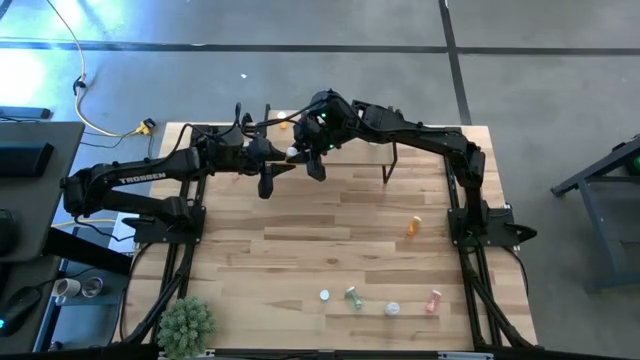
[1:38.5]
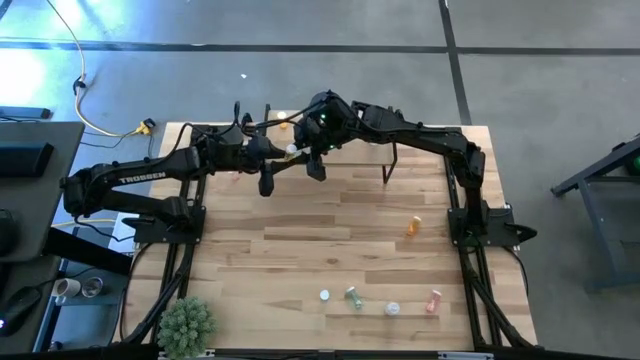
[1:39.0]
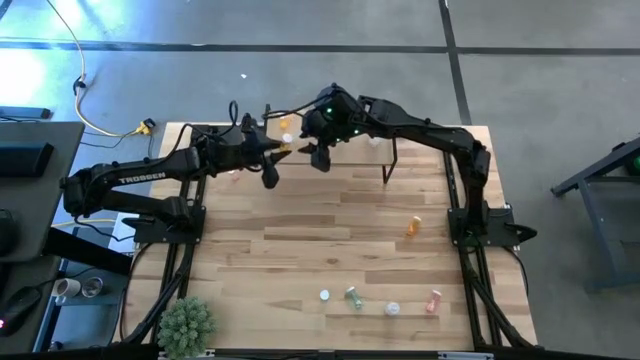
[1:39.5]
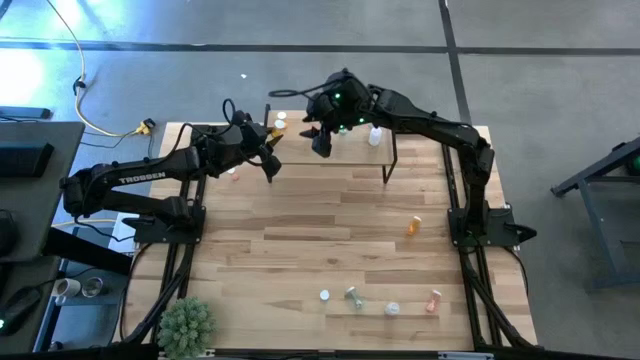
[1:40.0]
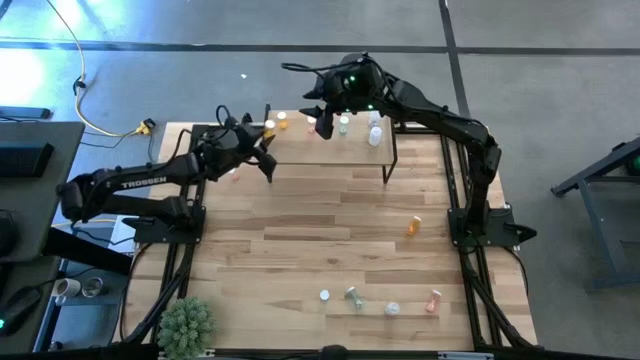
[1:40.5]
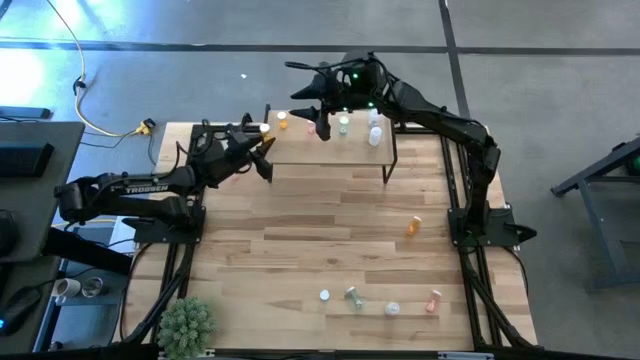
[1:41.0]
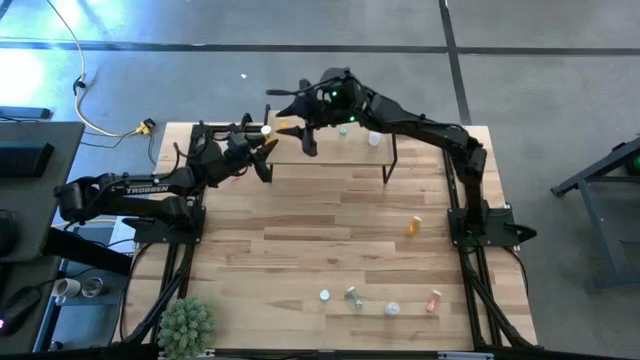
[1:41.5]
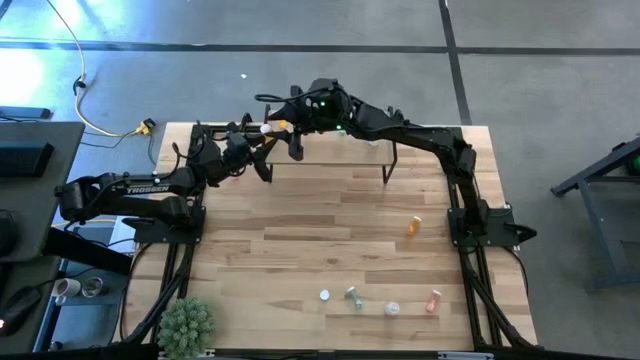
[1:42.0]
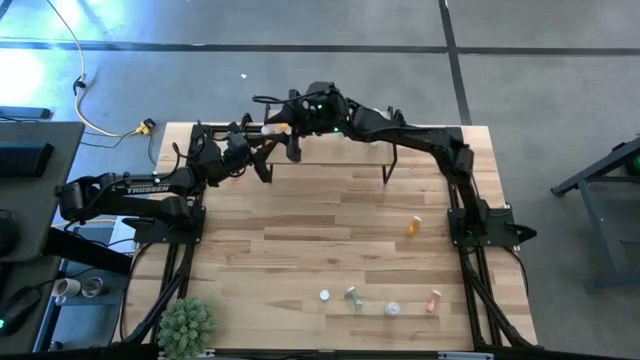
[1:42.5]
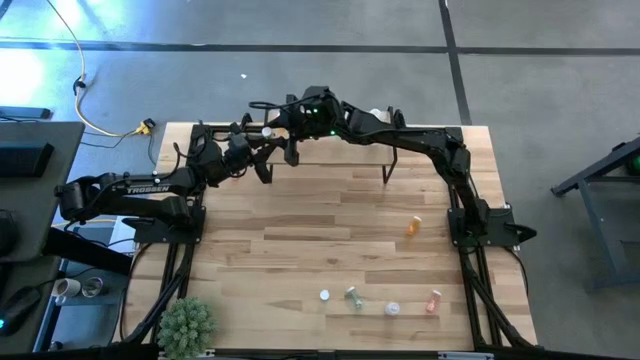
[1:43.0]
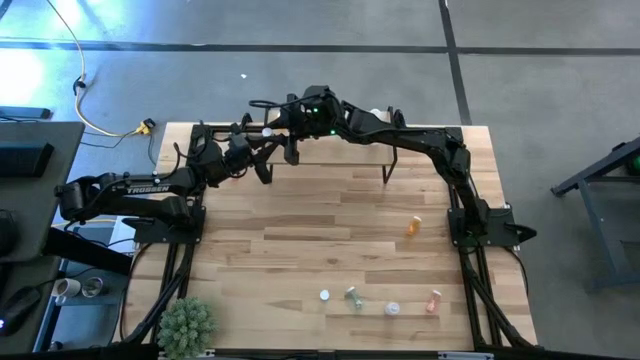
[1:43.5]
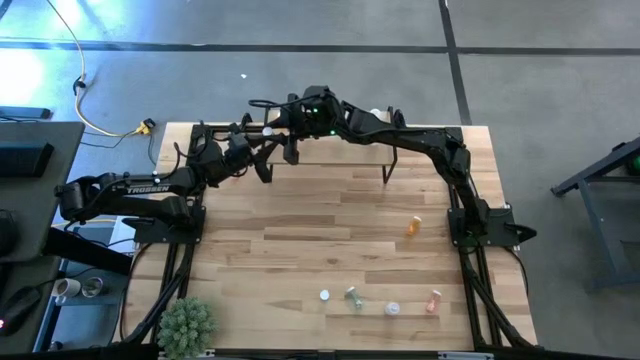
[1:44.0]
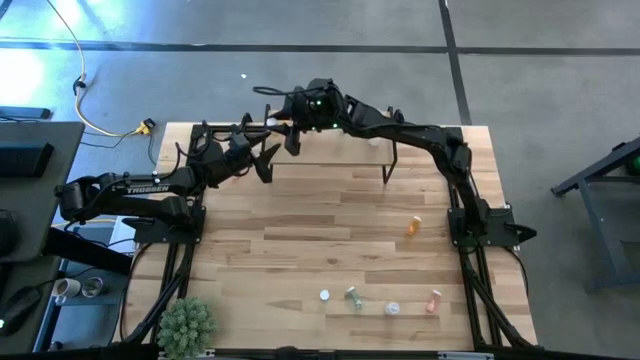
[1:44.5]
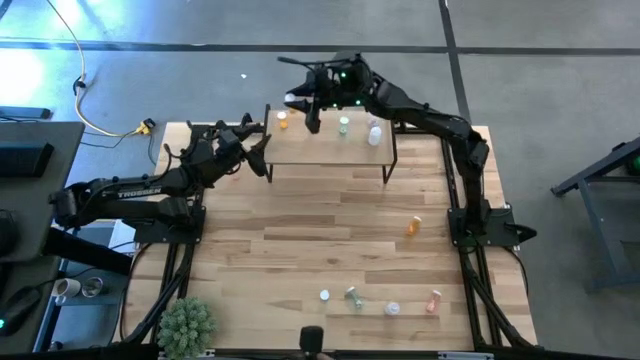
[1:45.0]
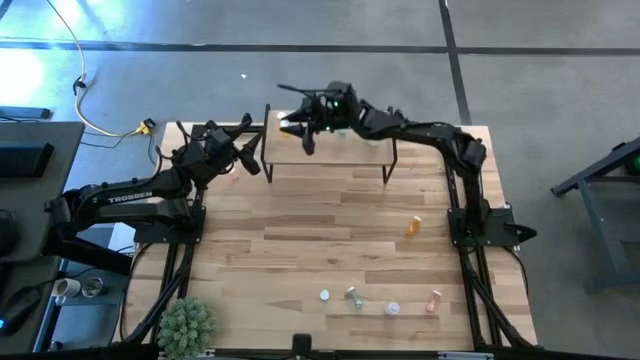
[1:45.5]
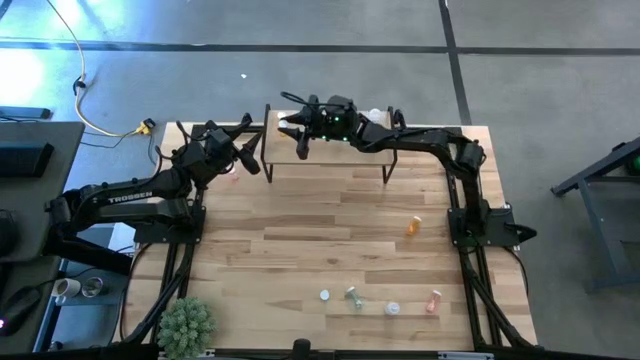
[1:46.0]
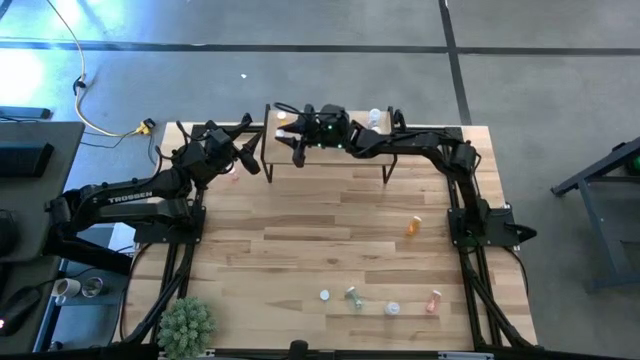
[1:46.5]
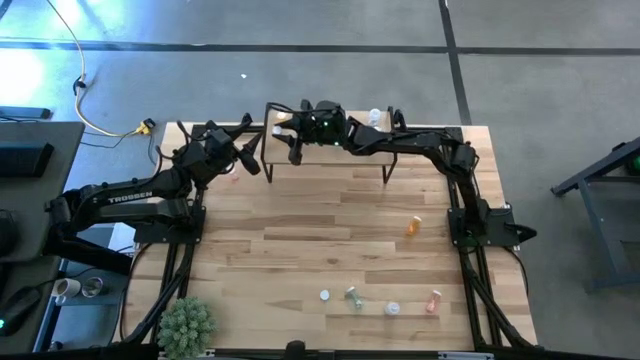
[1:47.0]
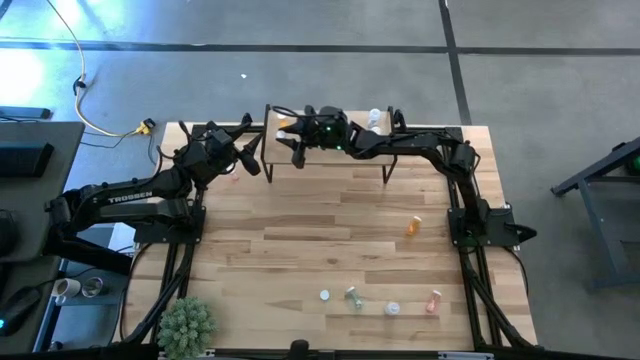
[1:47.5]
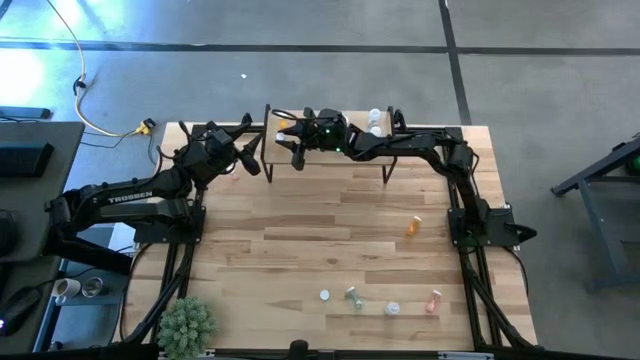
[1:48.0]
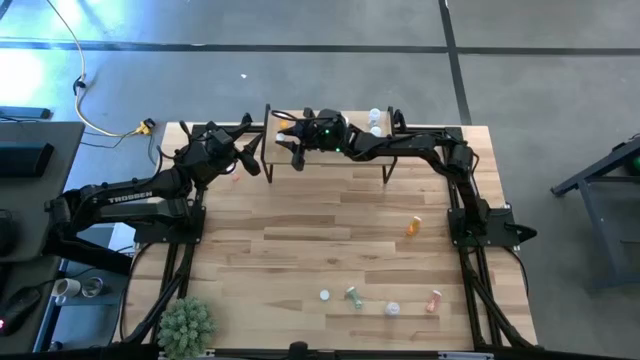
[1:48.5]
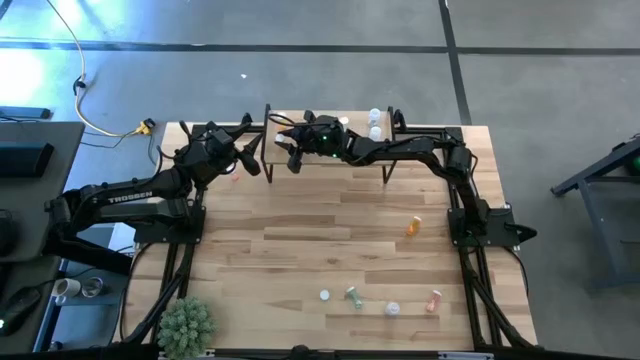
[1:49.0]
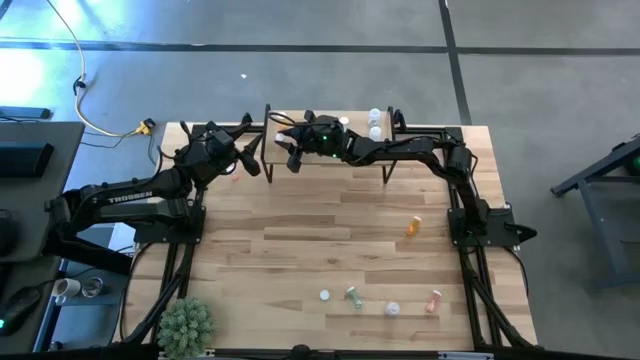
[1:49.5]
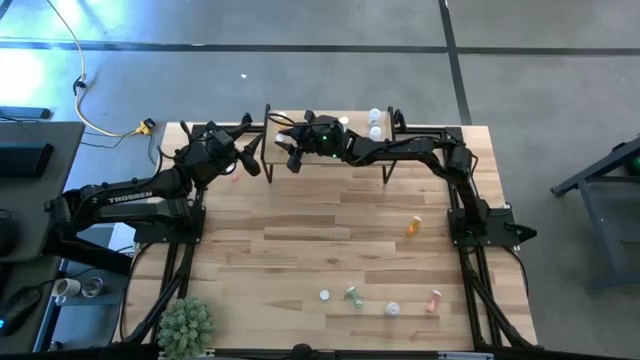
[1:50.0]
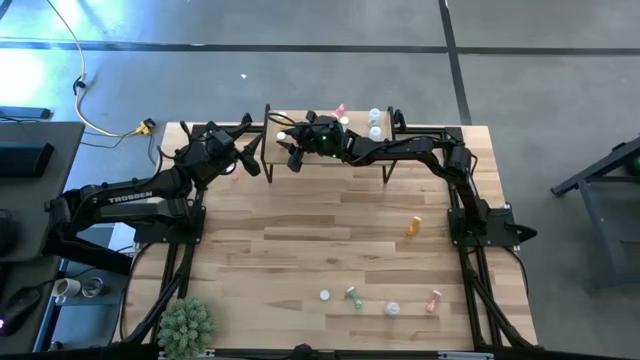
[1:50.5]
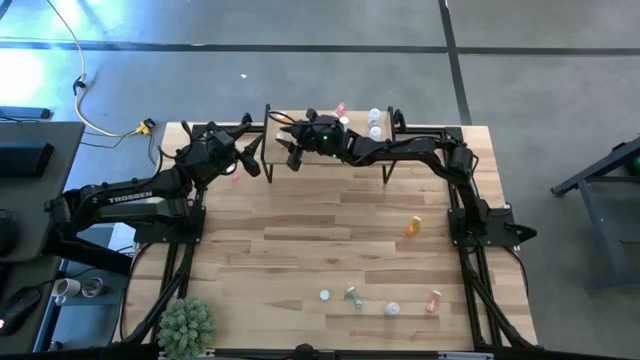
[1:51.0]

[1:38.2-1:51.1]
Task: Pick and place medicine bottles onto shelf by color
Put the bottom orange pill bottle on the shelf aligned with the orange pill bottle

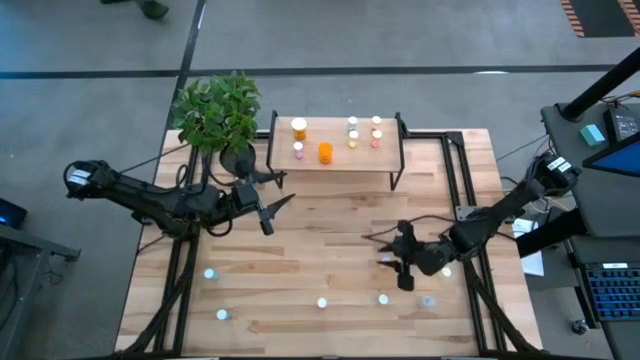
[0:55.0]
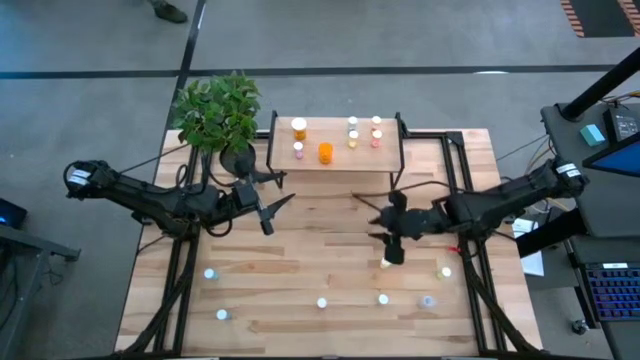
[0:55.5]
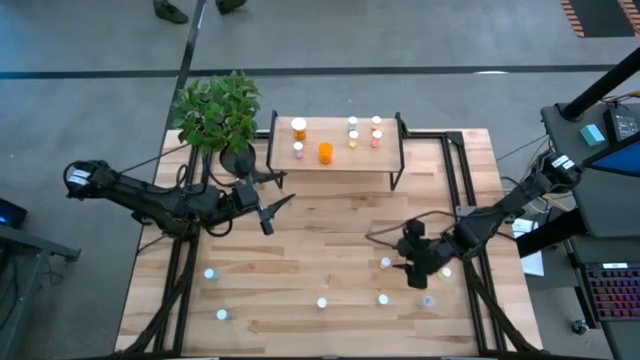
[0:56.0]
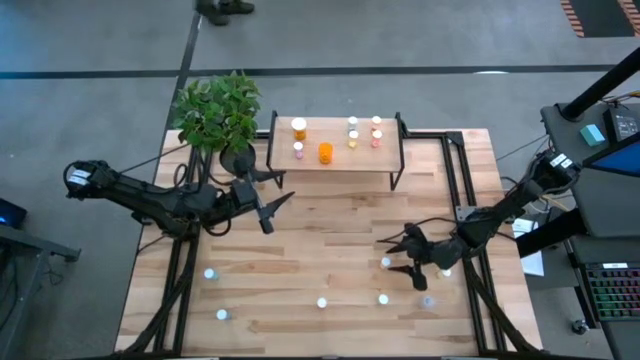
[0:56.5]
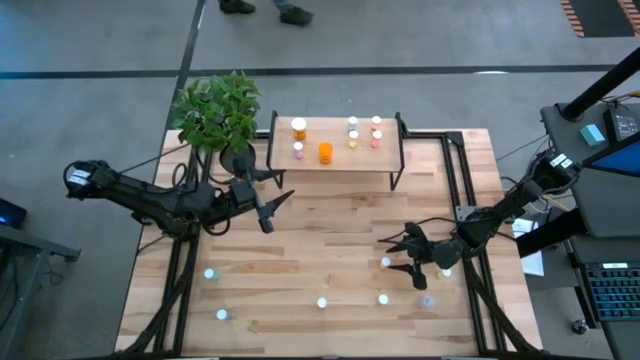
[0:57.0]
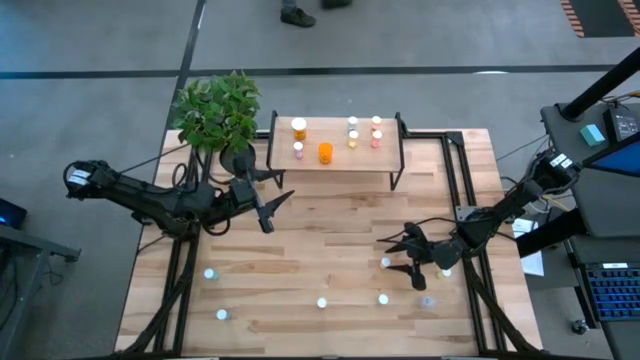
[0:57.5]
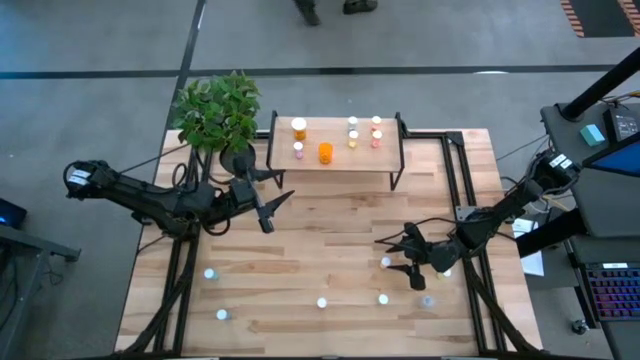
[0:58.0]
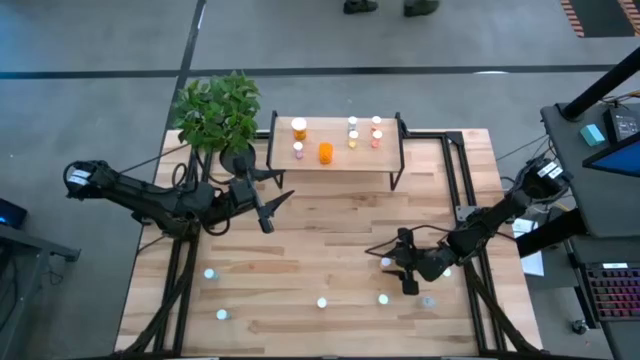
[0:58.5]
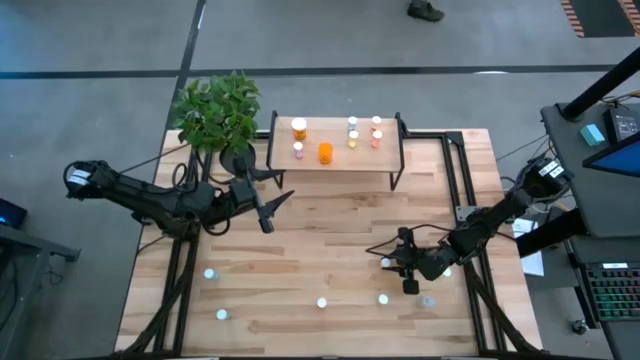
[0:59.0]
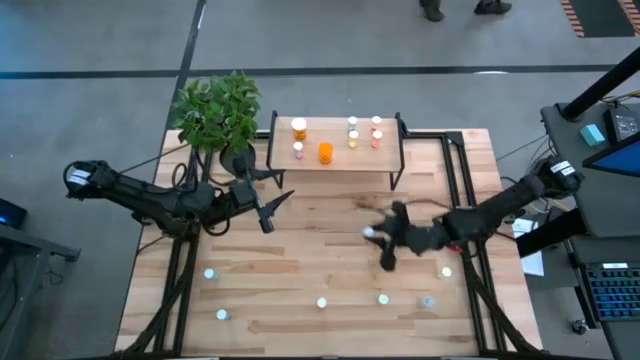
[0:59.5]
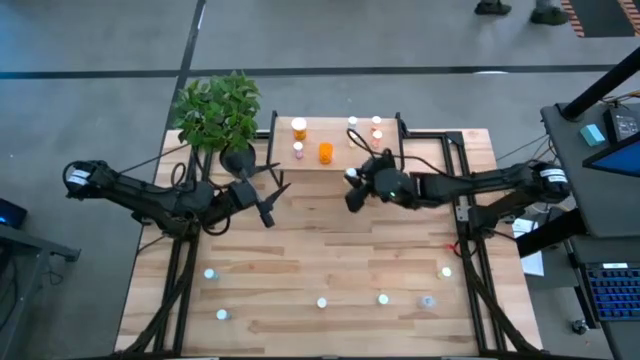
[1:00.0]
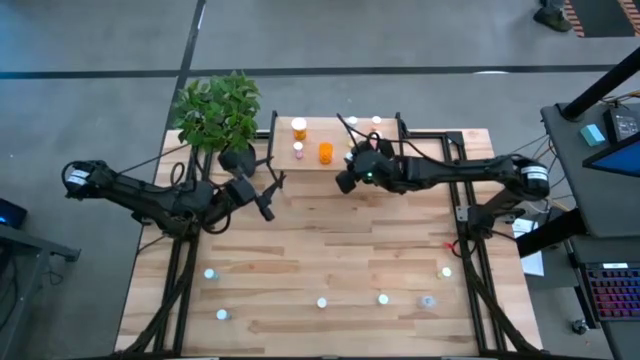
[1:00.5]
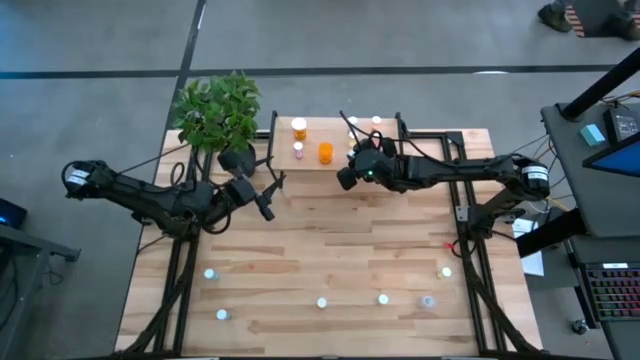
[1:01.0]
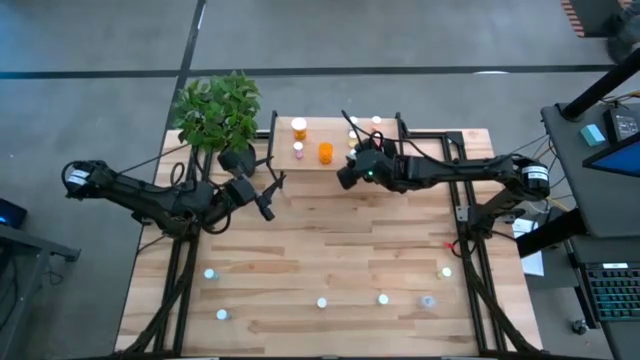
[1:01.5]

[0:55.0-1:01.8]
Task: Pick and place medicine bottles onto shelf by color
Put the yellow pill bottle on the shelf

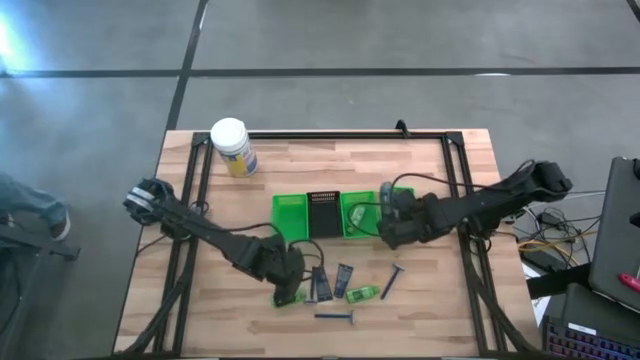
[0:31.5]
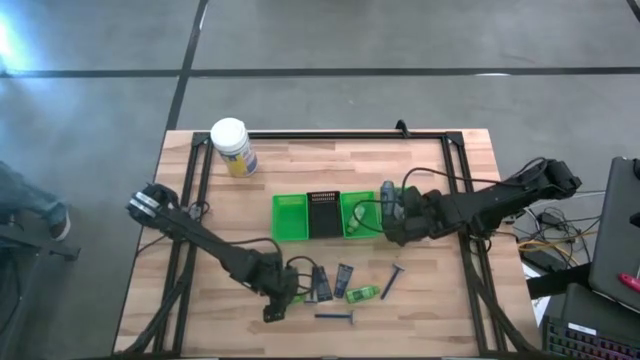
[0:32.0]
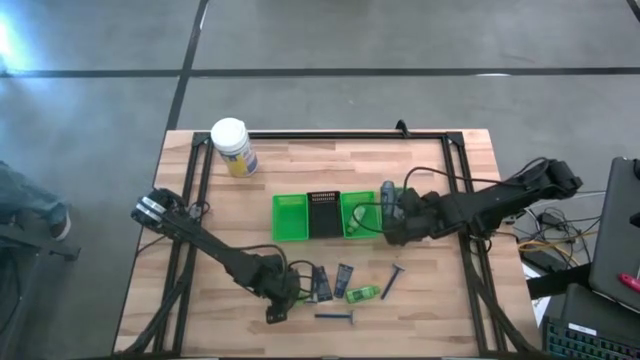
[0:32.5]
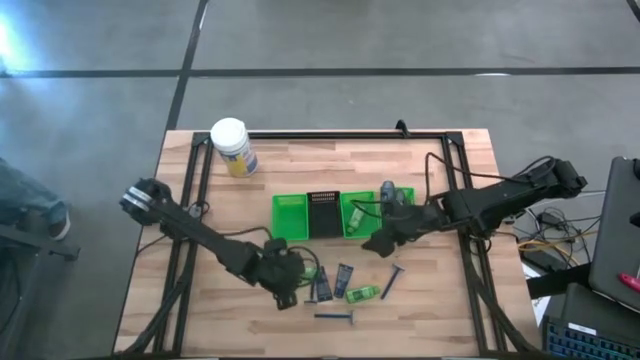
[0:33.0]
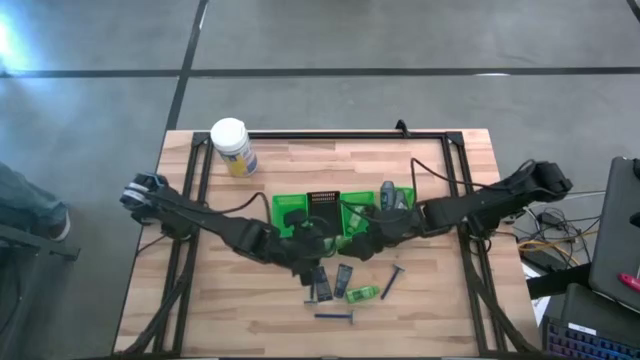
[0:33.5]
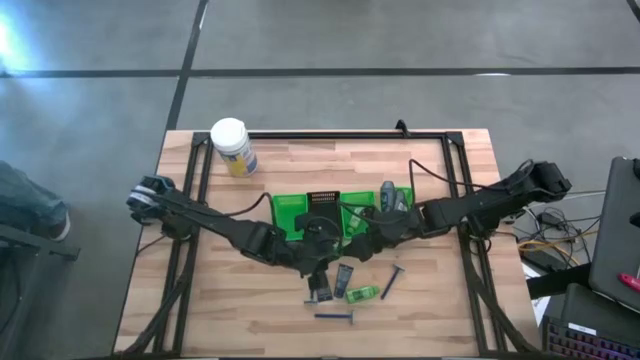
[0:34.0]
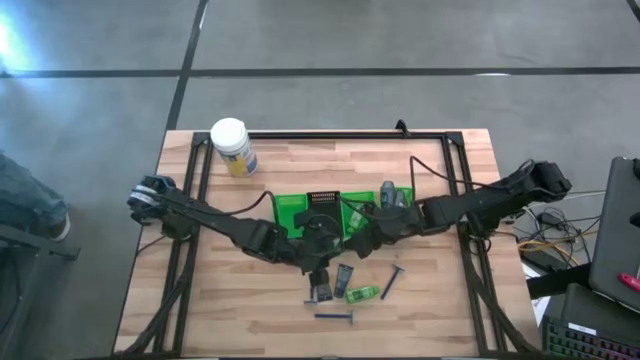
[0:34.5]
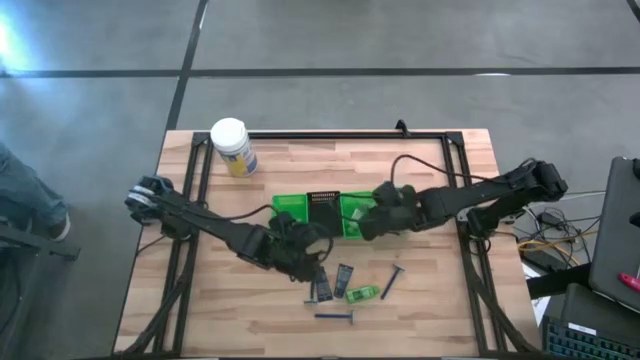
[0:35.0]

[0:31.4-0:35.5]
Task: Pick & Place Travel size toiletries
Put the green shampoo into the middle green basket
